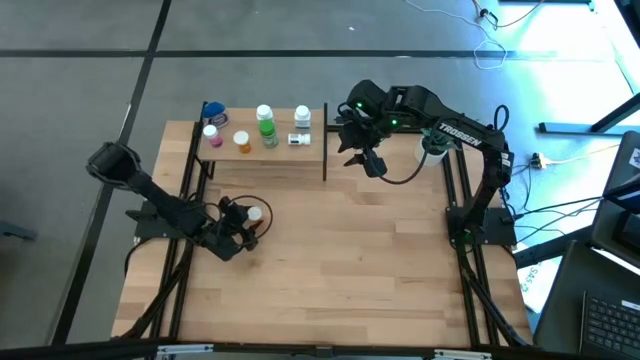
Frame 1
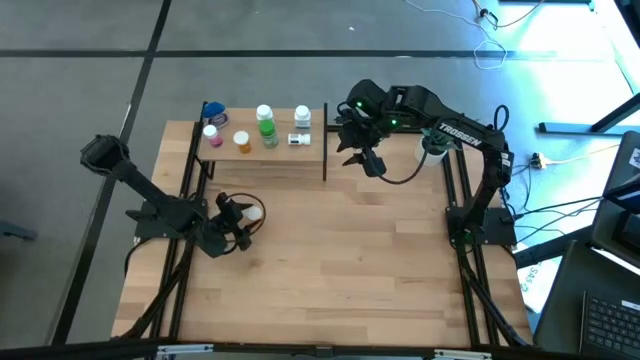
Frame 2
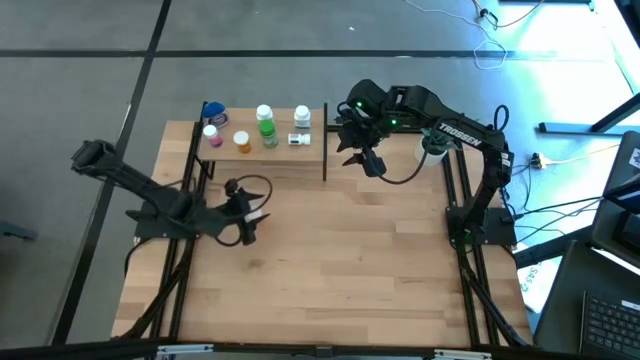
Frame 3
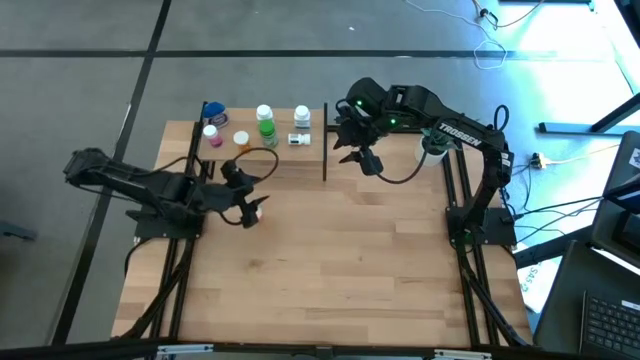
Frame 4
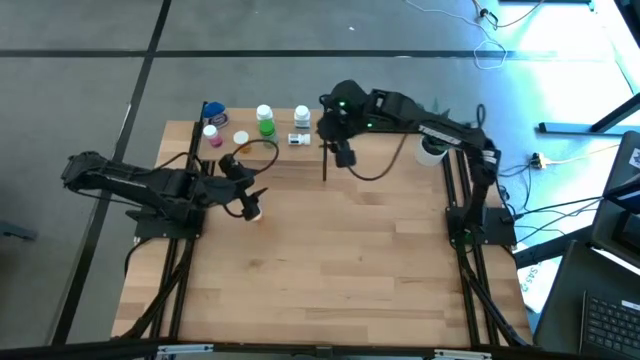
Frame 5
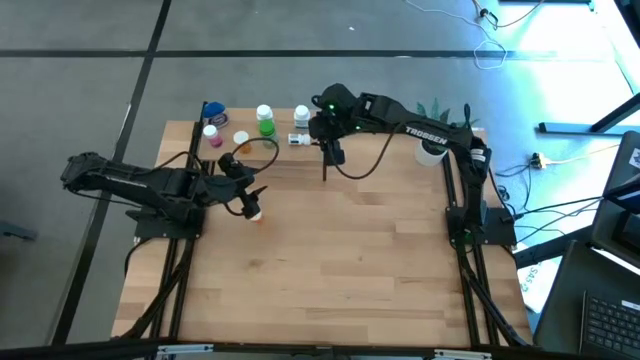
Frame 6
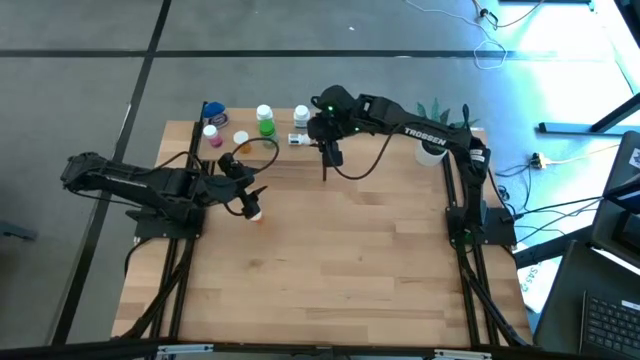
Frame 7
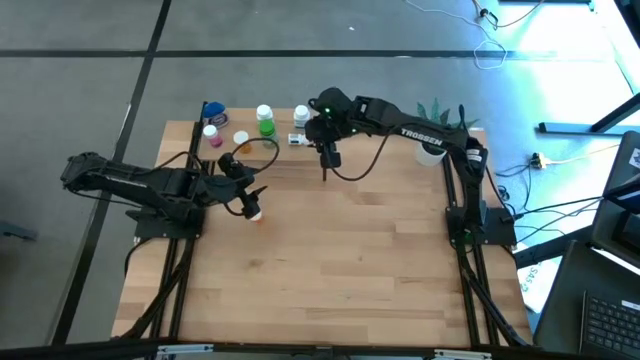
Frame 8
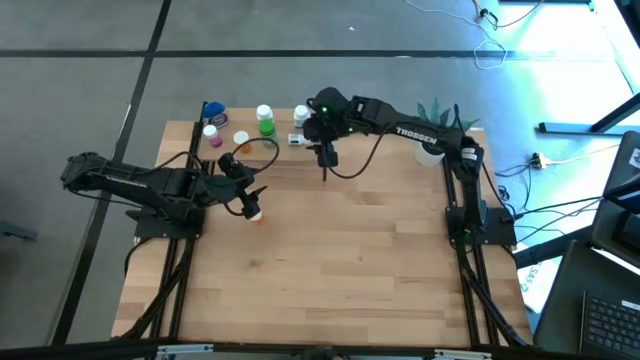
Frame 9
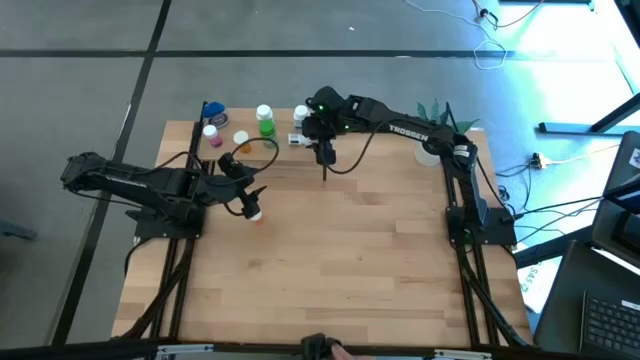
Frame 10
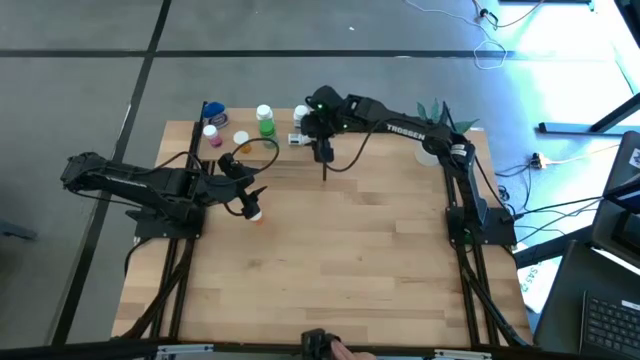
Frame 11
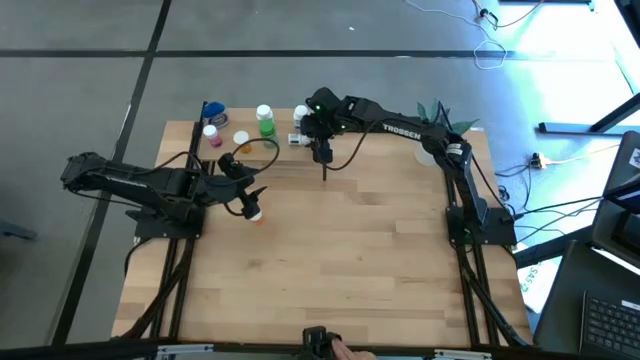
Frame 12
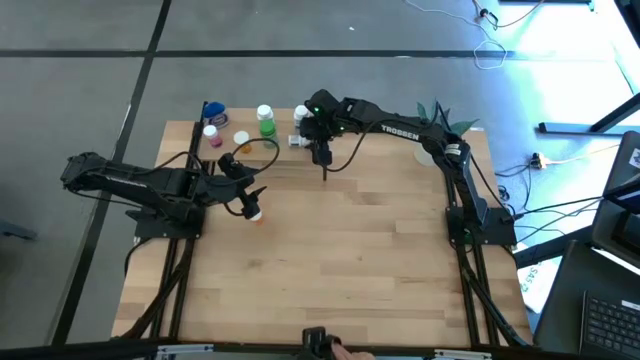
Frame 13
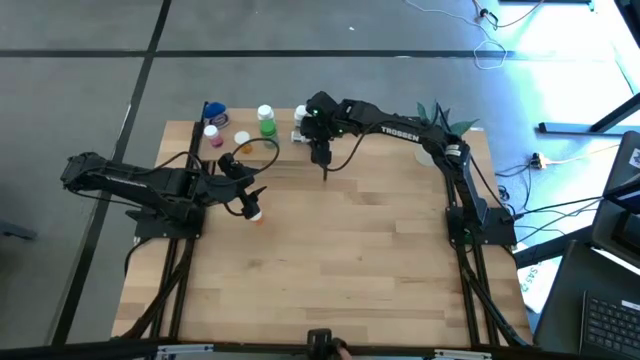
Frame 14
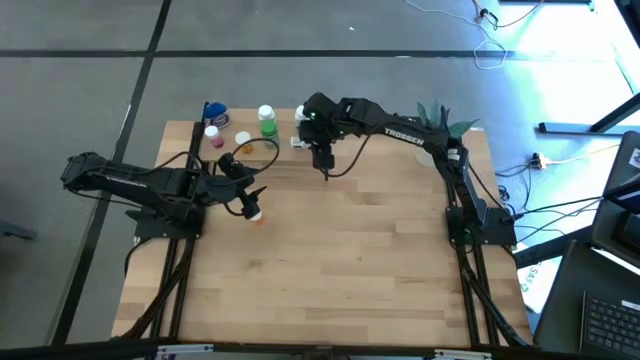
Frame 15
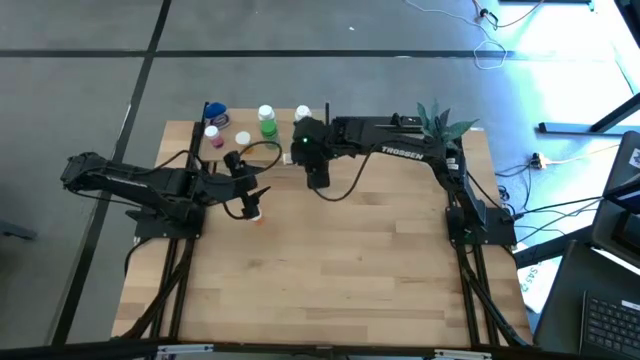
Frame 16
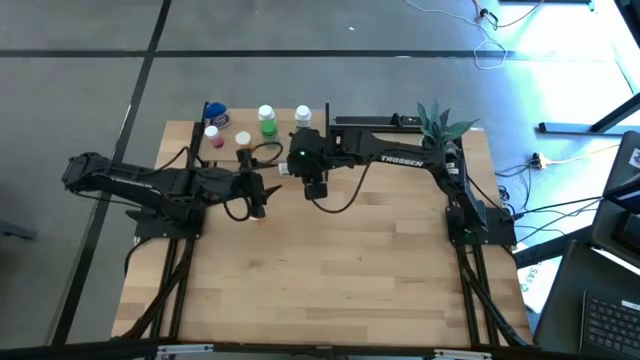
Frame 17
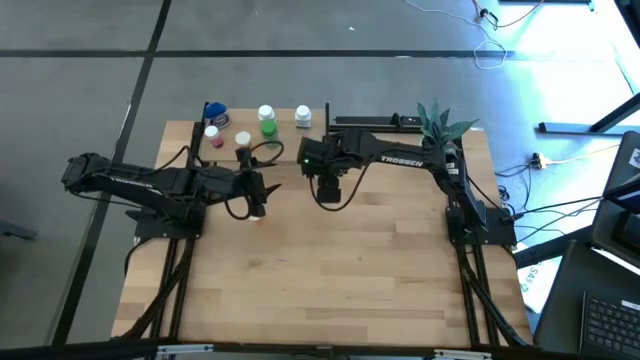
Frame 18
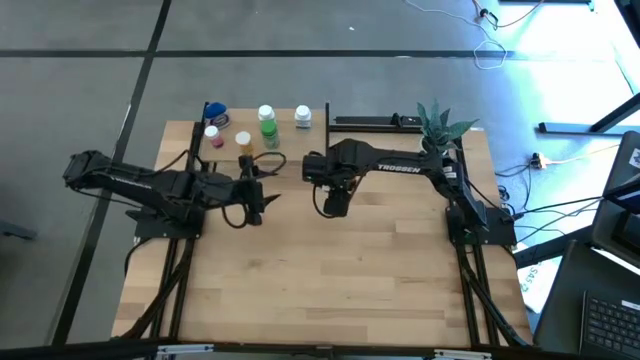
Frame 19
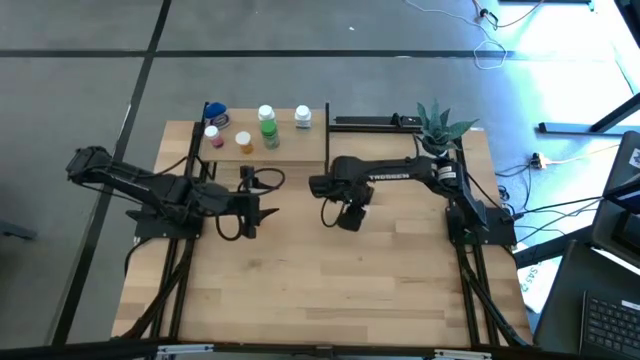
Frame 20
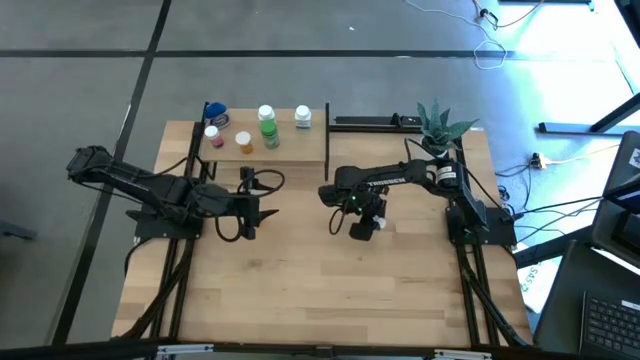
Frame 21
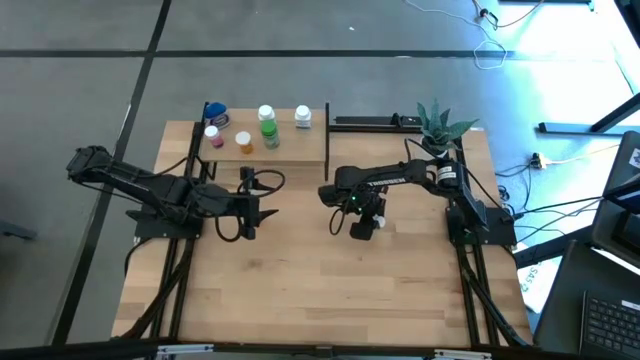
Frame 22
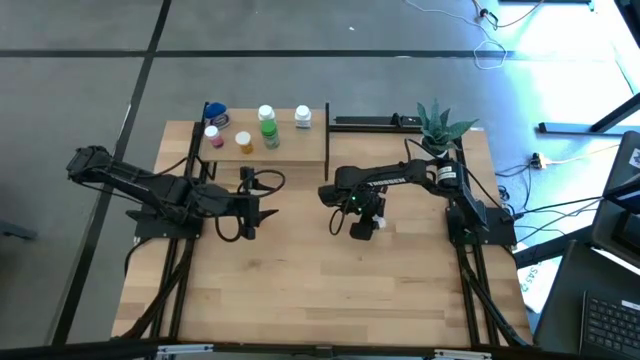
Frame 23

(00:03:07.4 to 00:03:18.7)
Task: Pick and place medicine bottles onto shelf by color
Remove the white and black pill bottle from the shelf

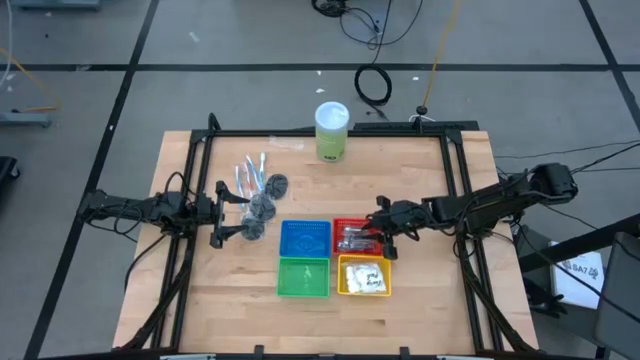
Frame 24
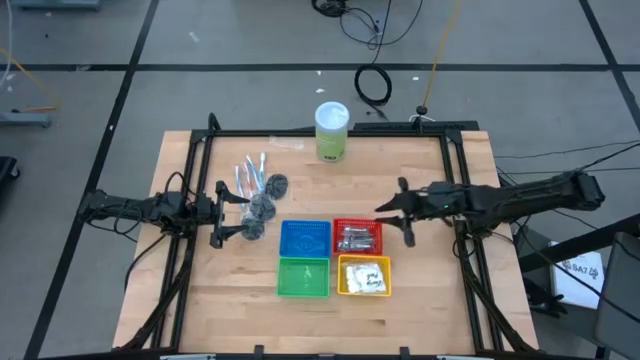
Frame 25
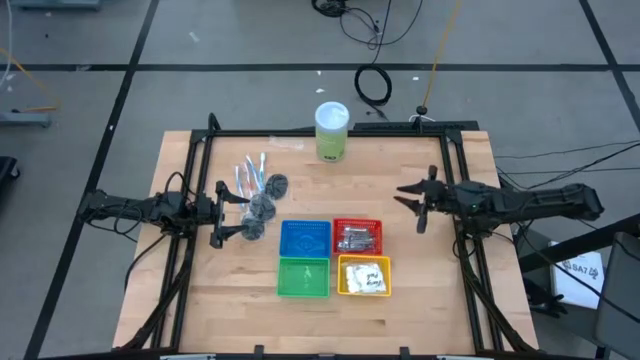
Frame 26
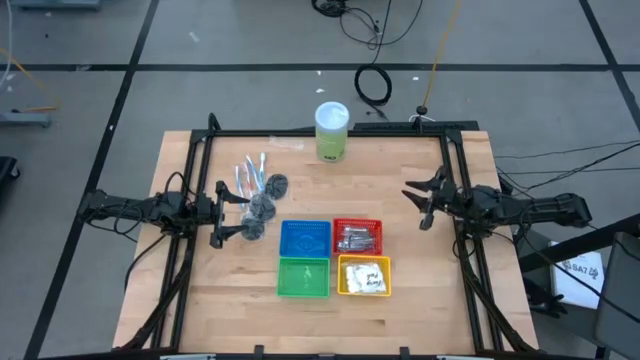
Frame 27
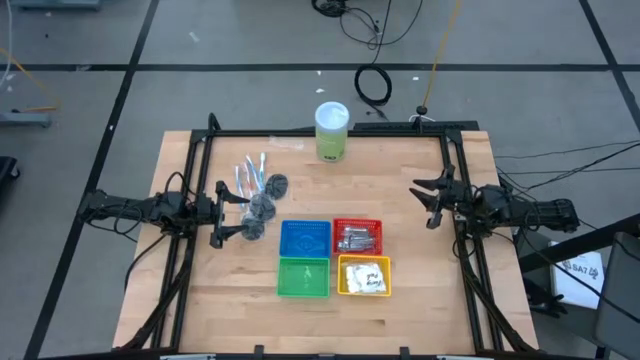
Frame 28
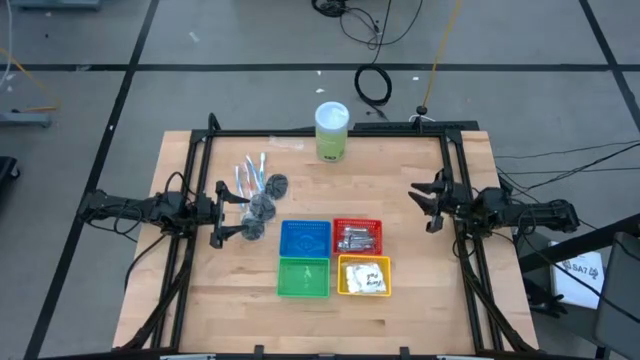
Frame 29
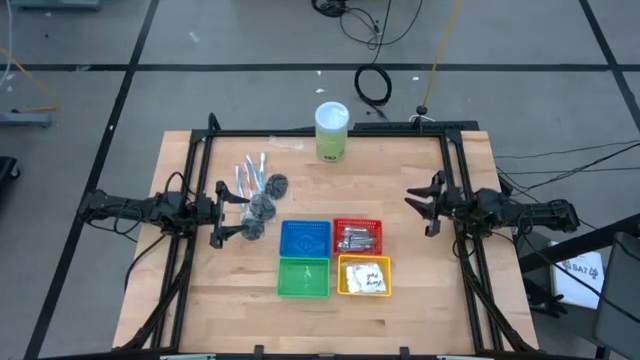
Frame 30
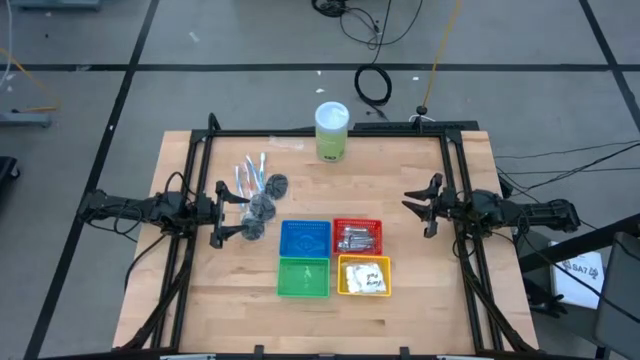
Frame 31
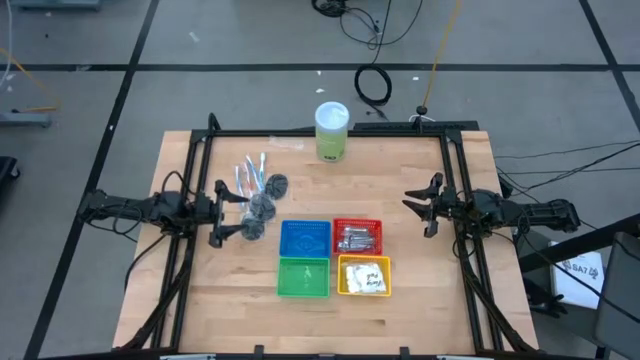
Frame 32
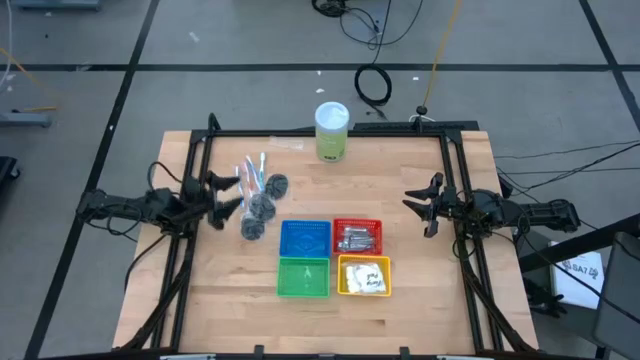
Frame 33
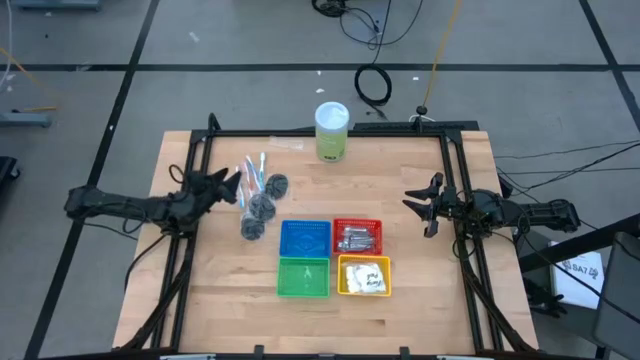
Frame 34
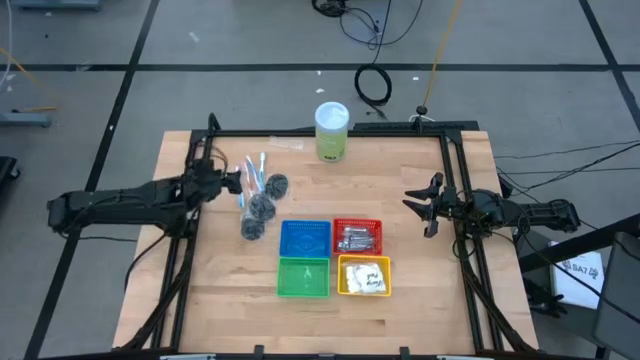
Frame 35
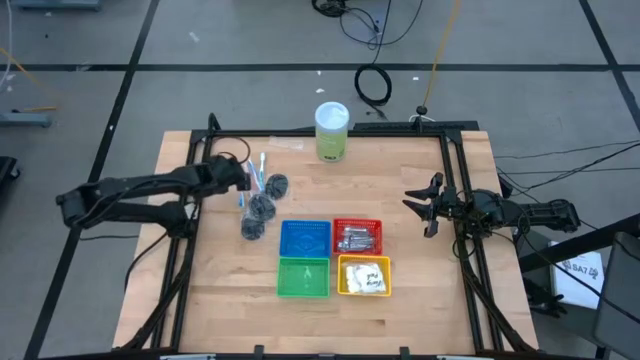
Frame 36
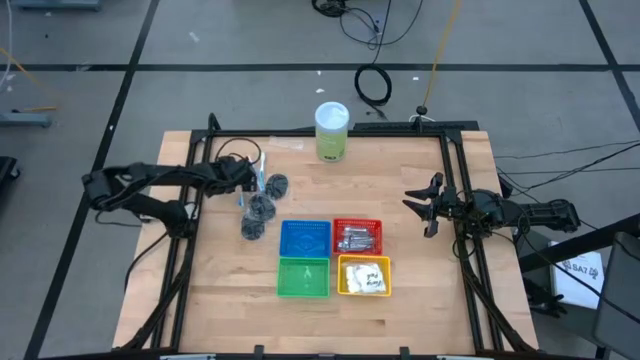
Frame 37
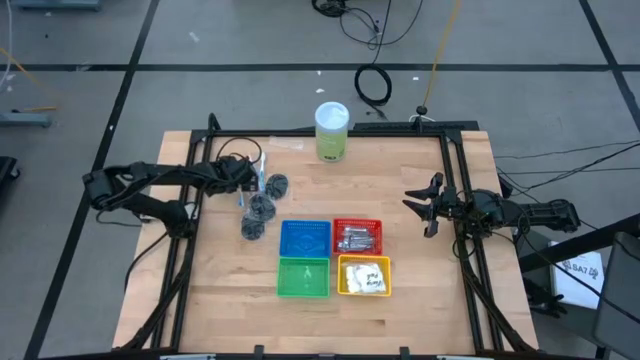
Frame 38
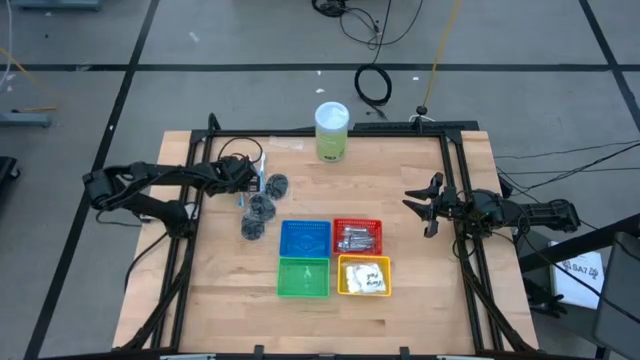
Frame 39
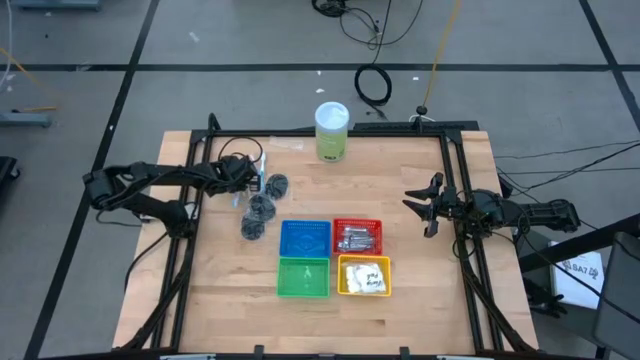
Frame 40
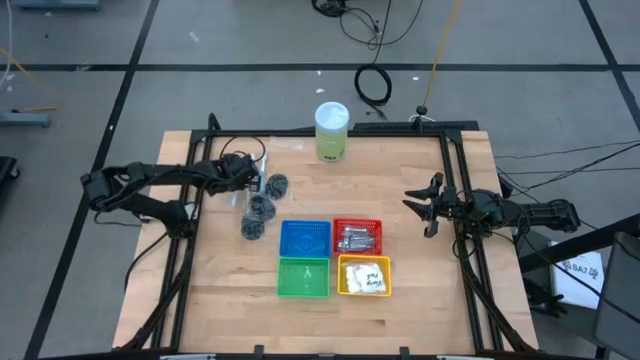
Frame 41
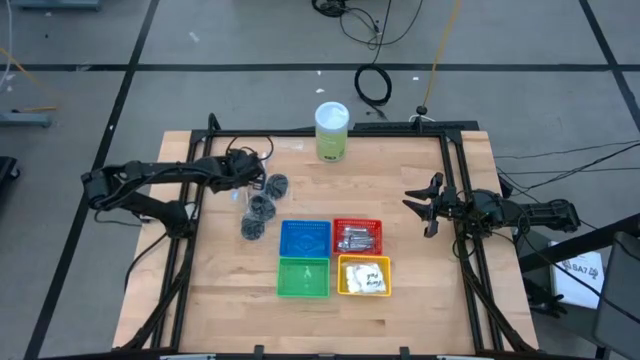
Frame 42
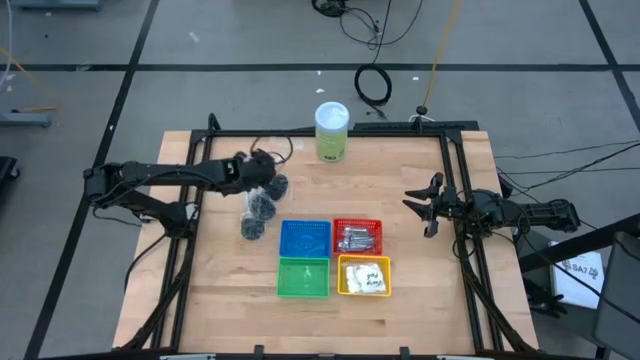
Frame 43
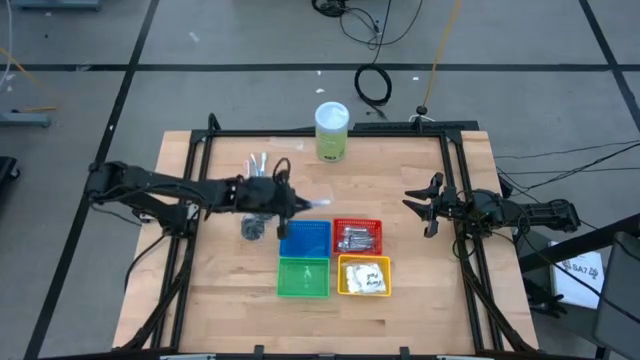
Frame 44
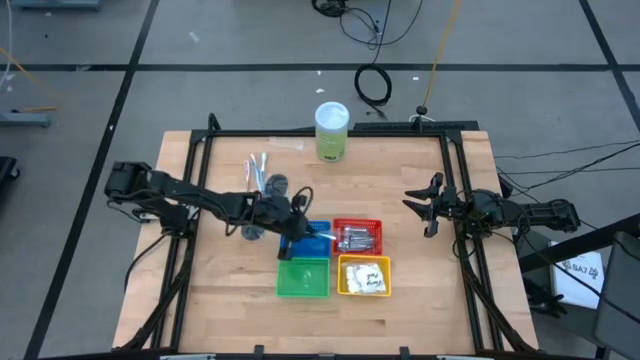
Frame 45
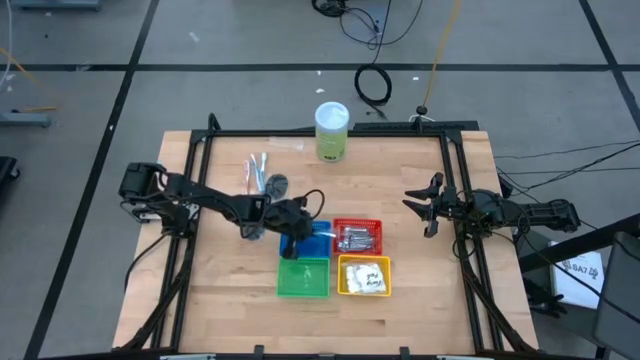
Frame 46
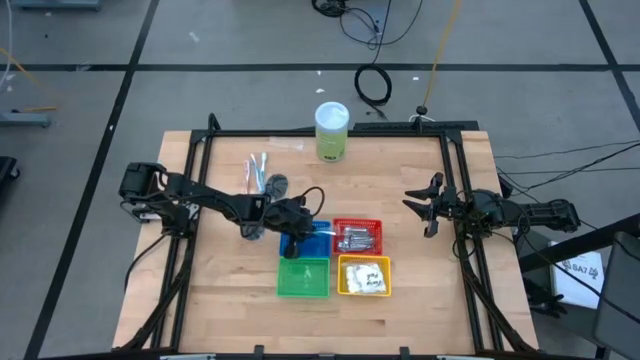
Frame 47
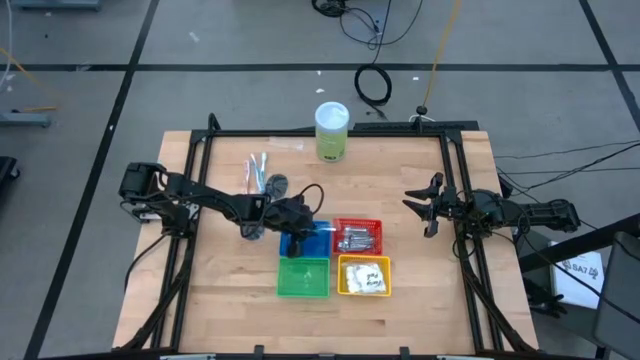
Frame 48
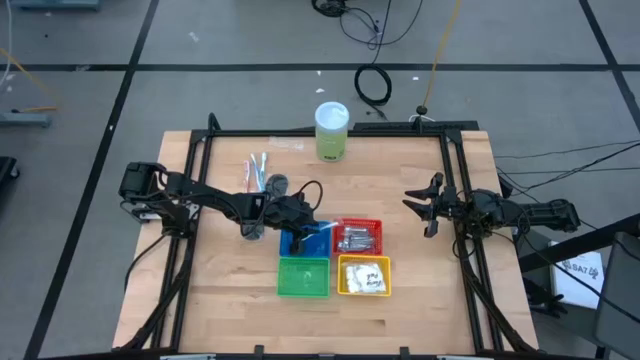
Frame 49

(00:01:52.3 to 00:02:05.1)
Task: Pick & Place Travel size toiletries
Put the left blue toothbrush into the blue basket
